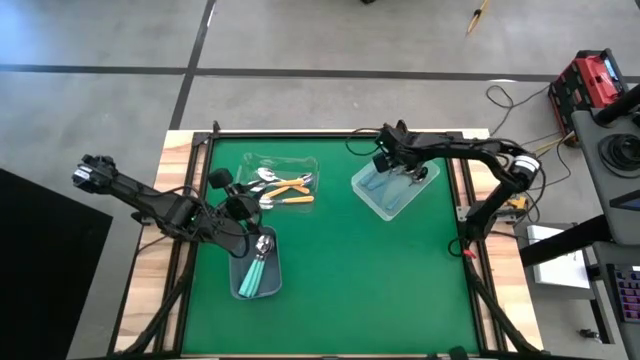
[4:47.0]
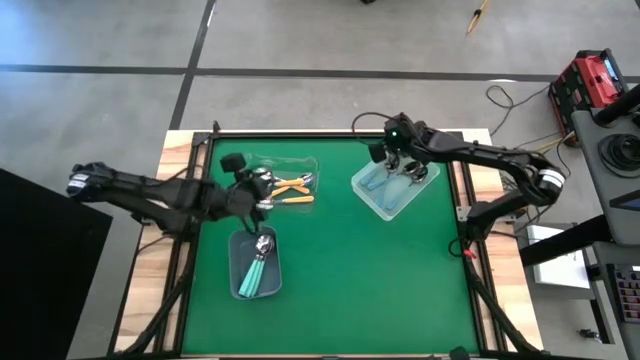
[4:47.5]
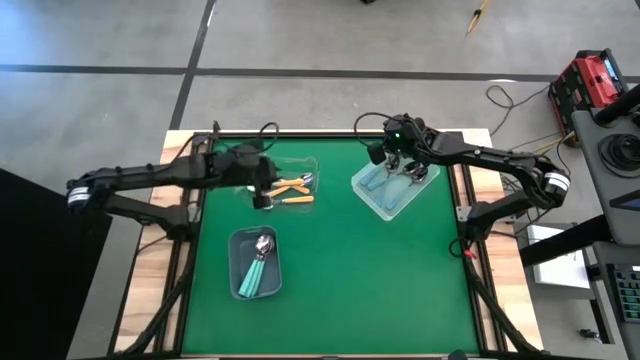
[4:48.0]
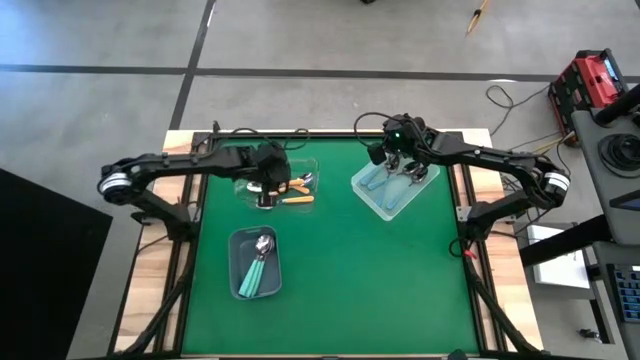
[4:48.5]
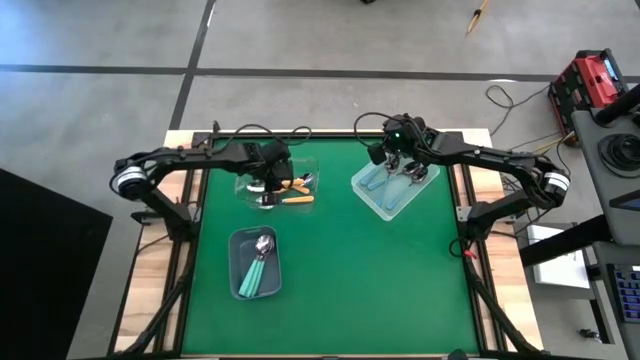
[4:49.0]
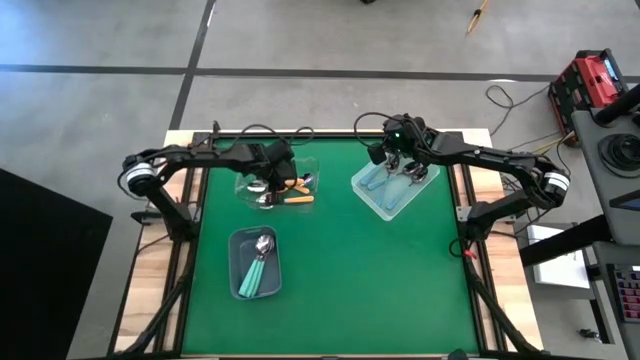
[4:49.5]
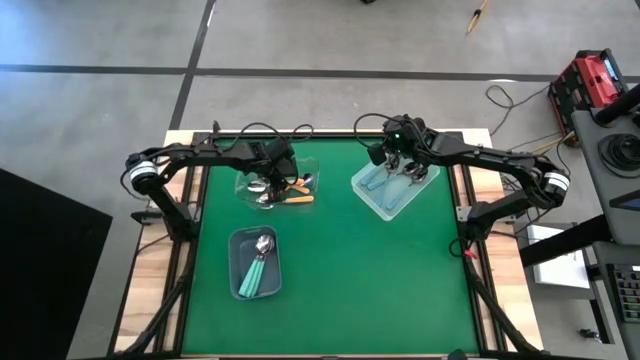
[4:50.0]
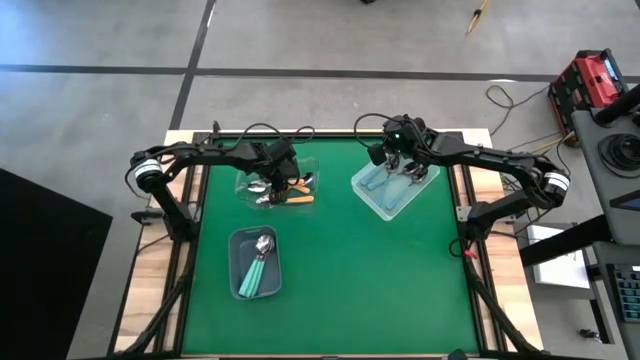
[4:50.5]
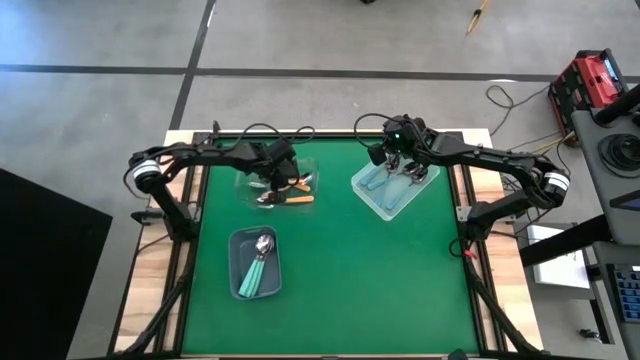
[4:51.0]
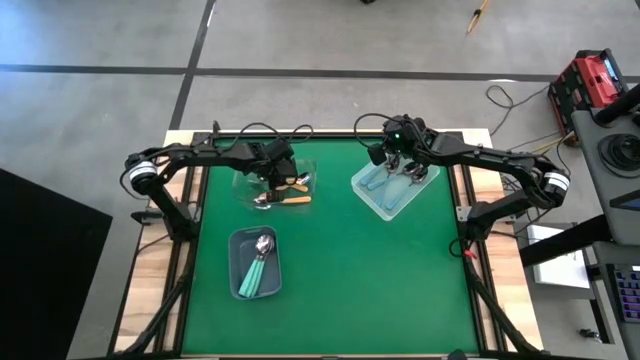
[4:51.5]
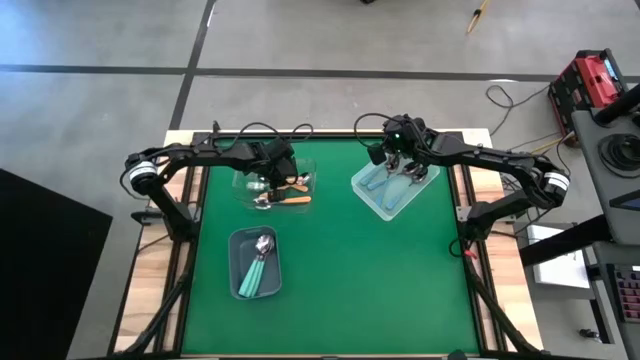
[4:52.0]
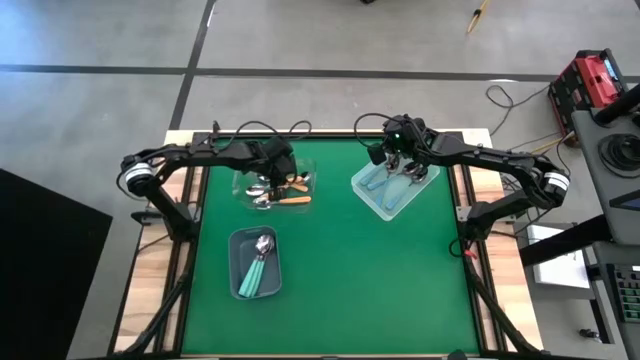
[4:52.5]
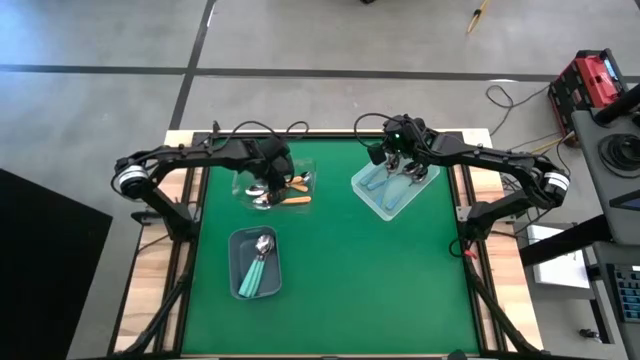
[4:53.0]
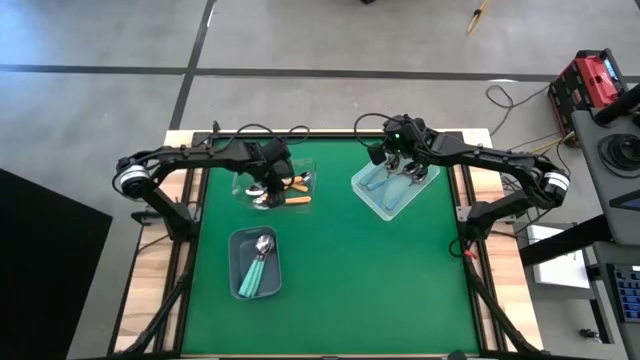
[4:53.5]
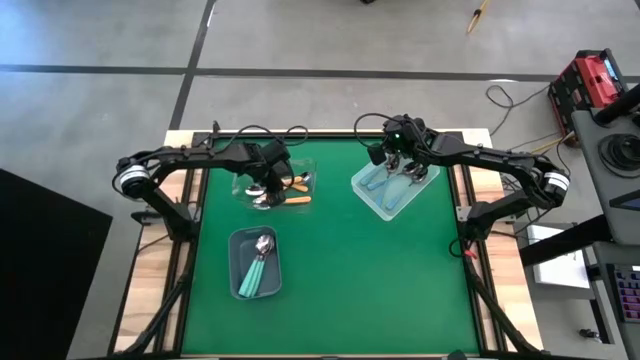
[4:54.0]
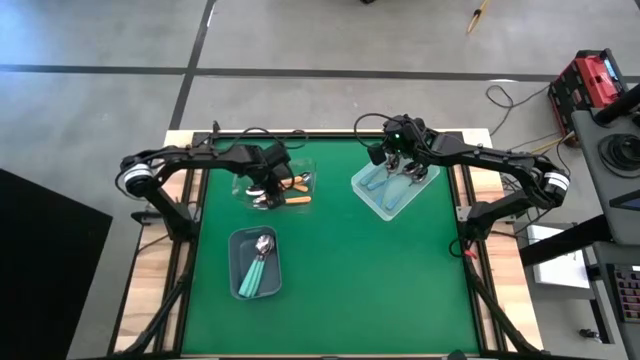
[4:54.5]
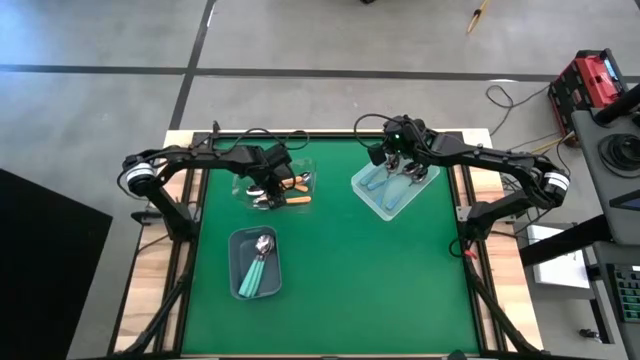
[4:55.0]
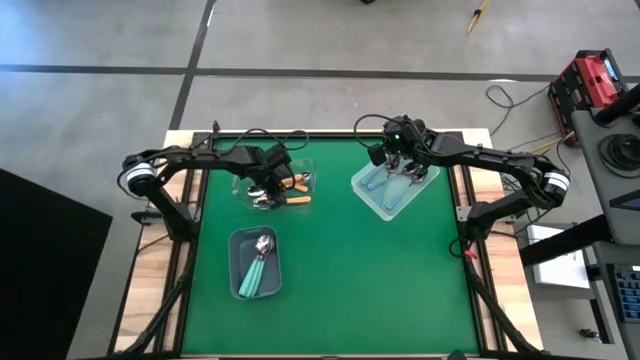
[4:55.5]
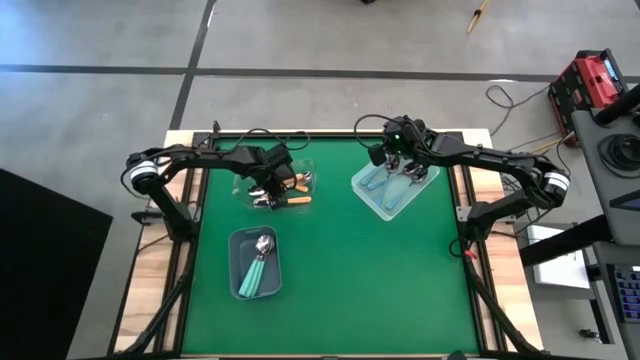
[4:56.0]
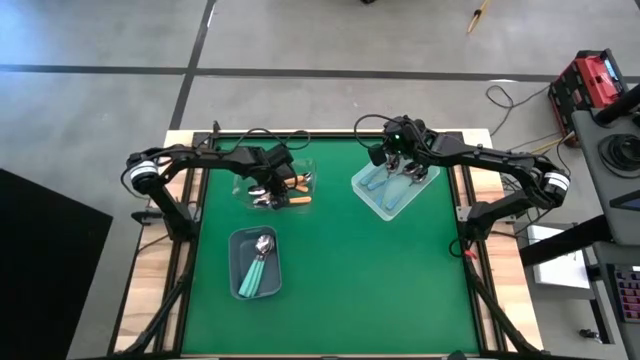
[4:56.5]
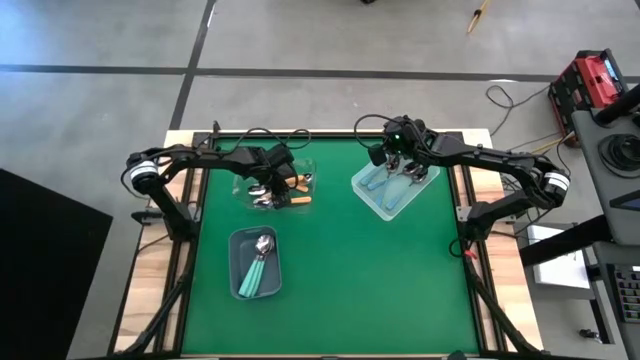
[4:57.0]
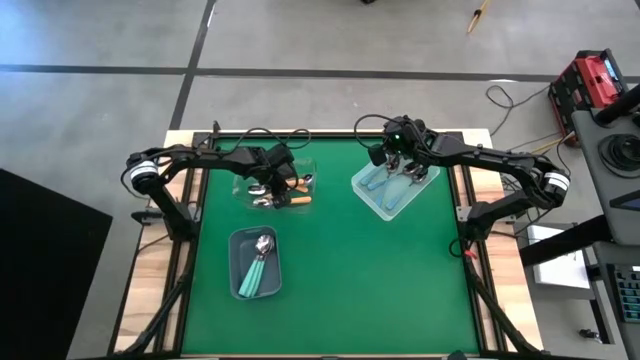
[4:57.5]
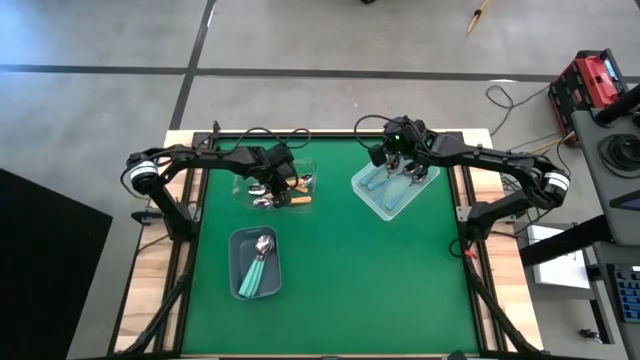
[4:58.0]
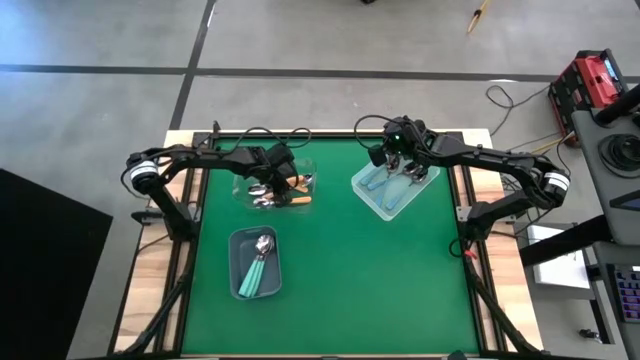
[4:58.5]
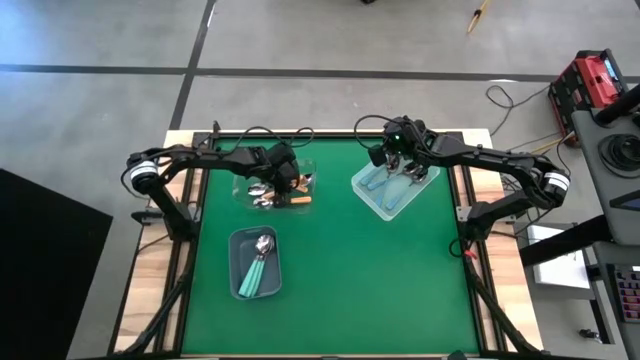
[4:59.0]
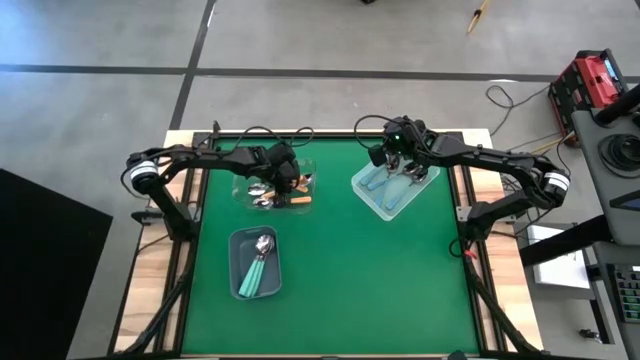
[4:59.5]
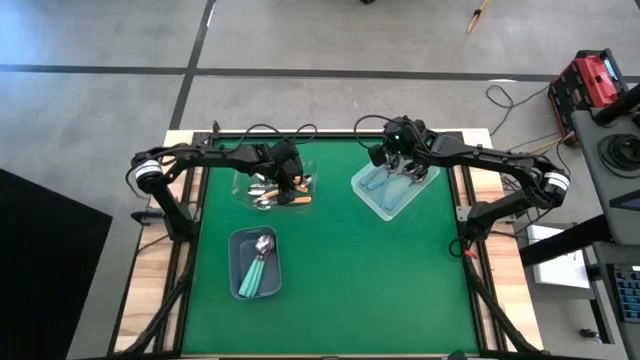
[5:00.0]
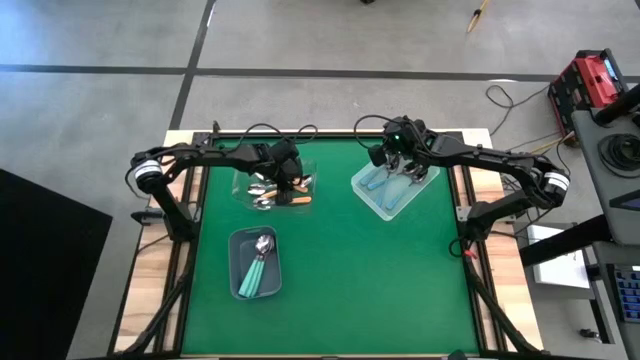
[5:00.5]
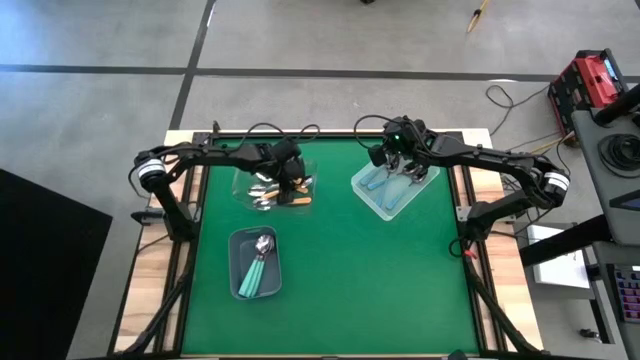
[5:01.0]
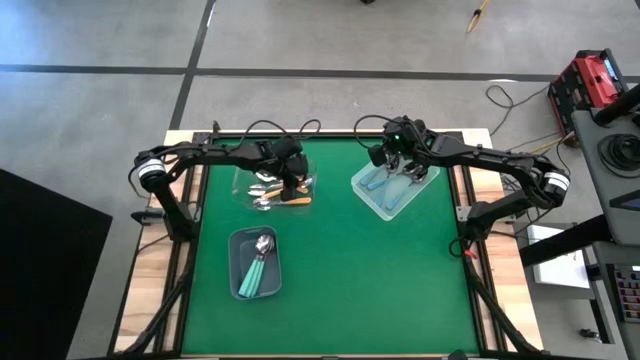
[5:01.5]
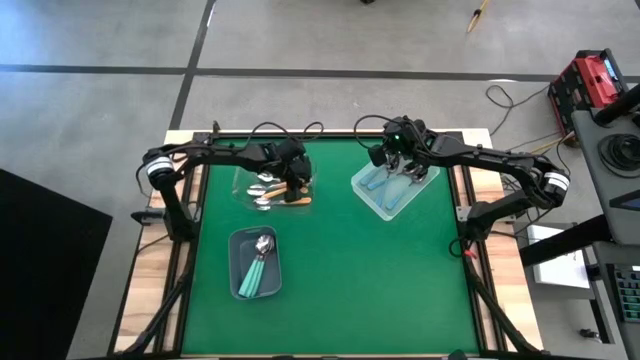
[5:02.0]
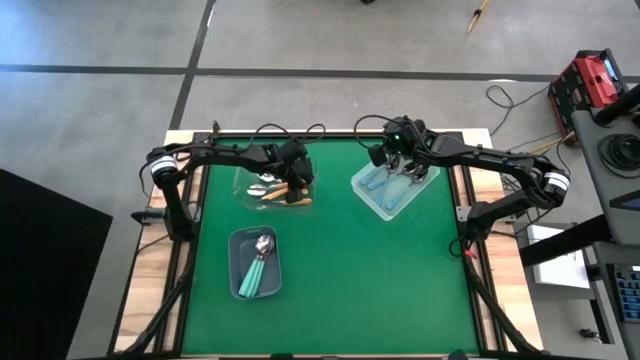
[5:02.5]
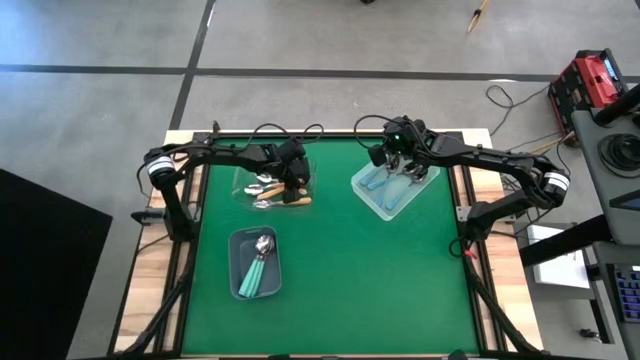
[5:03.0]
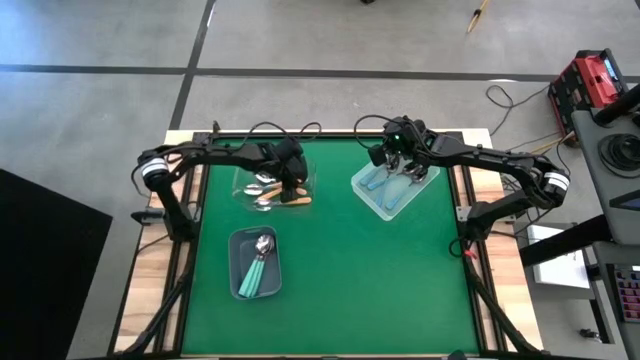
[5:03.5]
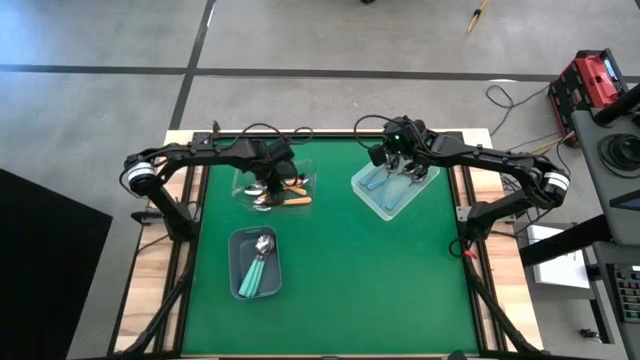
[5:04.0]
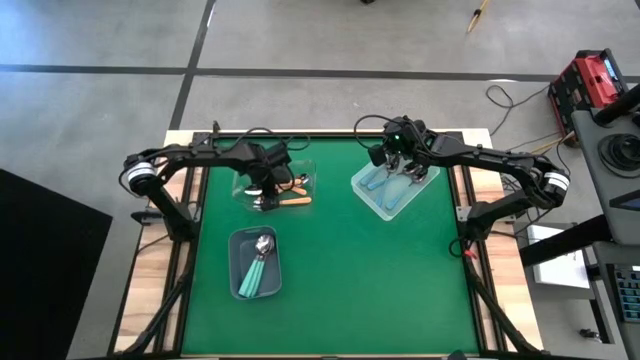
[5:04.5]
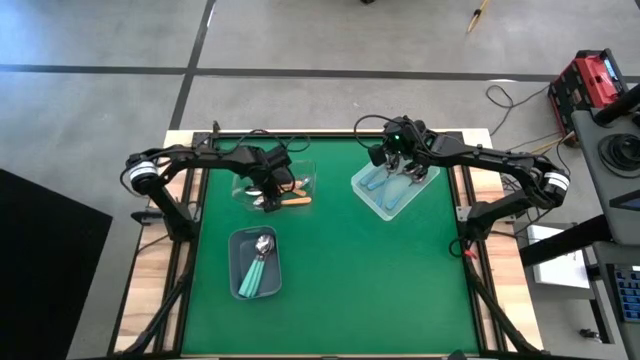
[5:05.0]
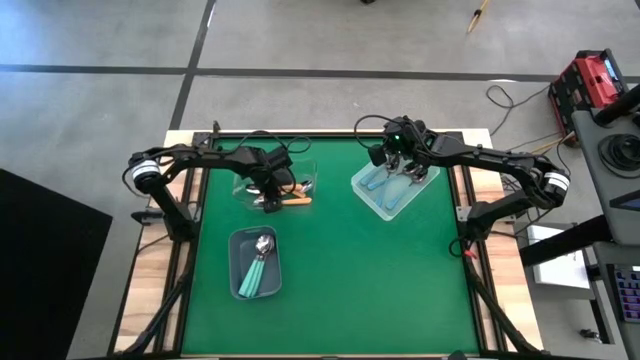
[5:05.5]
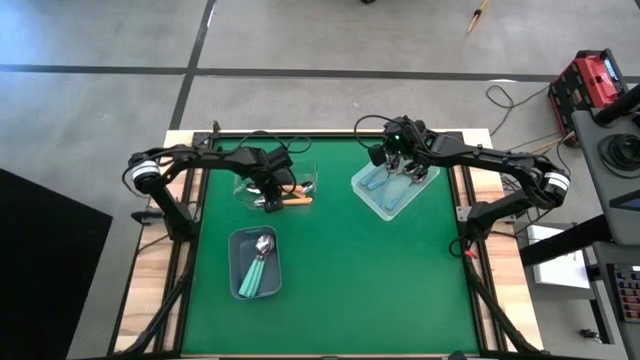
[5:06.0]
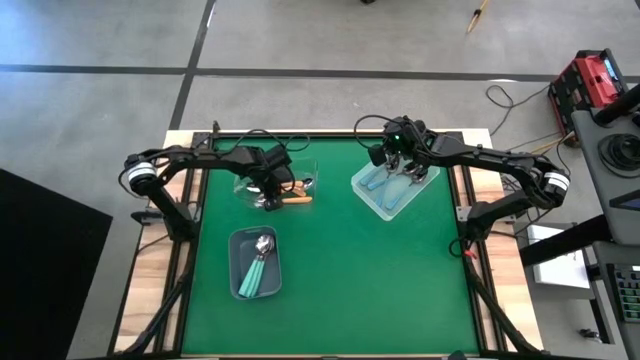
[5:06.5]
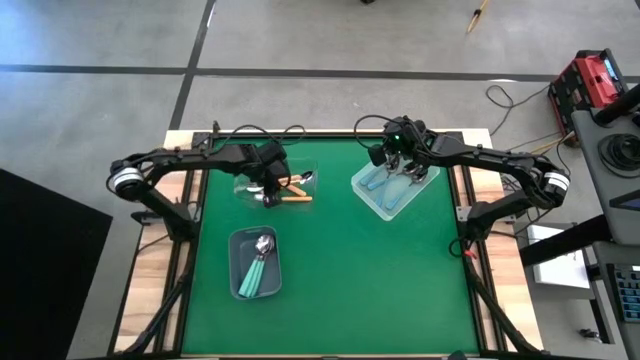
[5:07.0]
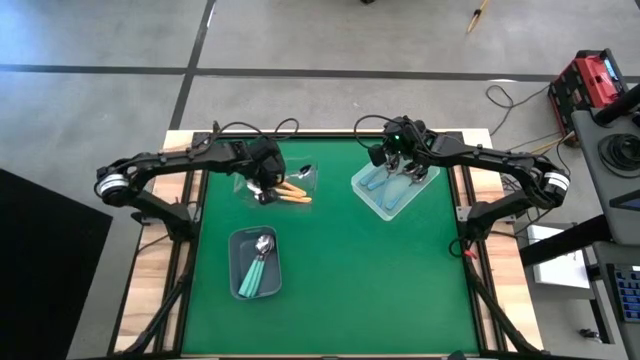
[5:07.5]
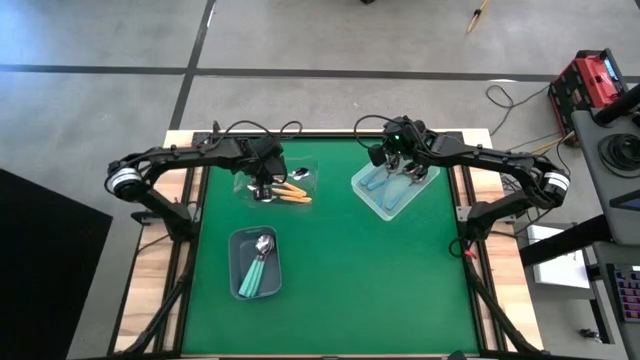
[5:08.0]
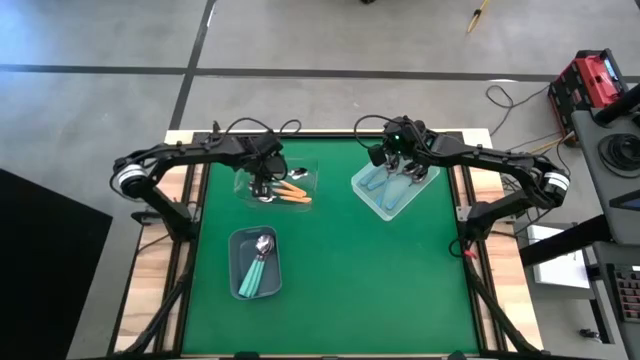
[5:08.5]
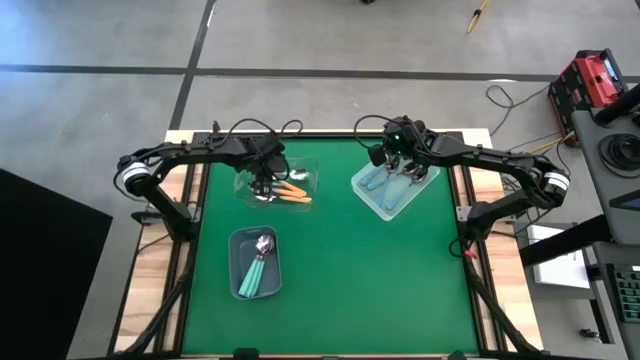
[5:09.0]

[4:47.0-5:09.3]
Task: Sort silverware by color (type)
Adjust the orange spoons in the transparent bin
